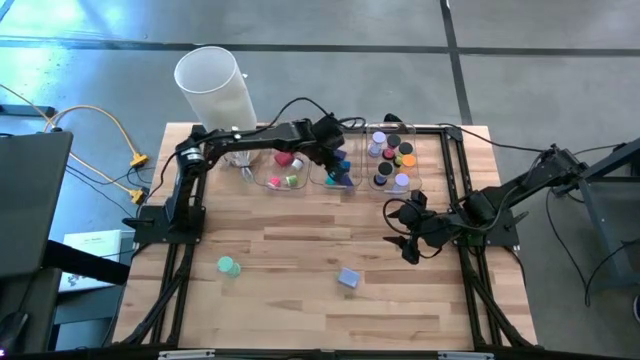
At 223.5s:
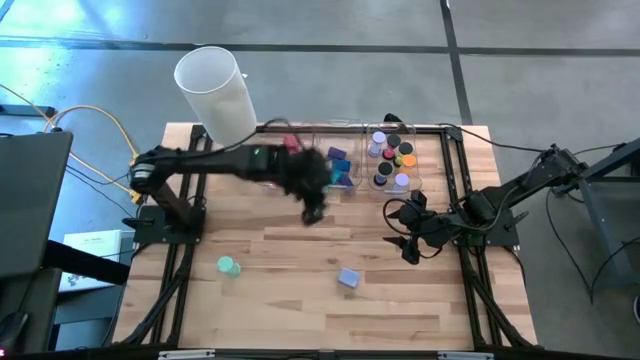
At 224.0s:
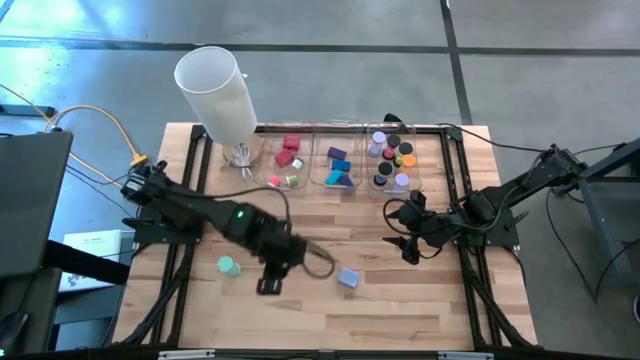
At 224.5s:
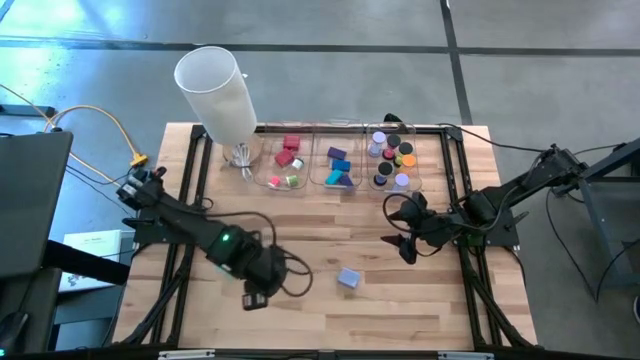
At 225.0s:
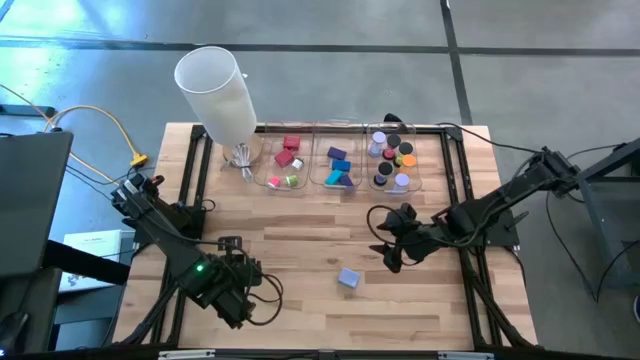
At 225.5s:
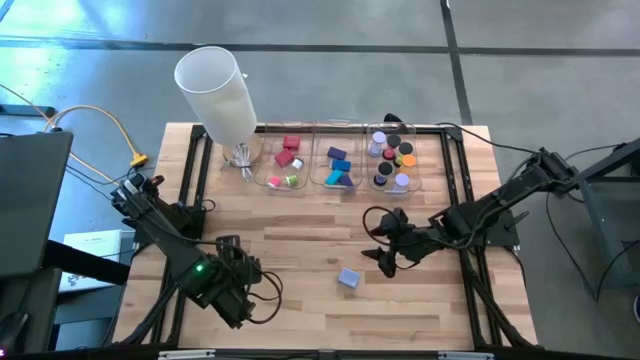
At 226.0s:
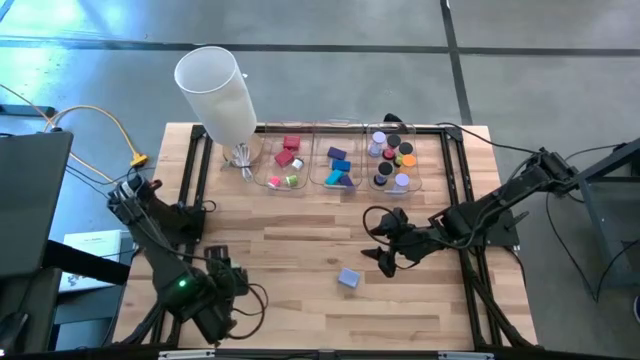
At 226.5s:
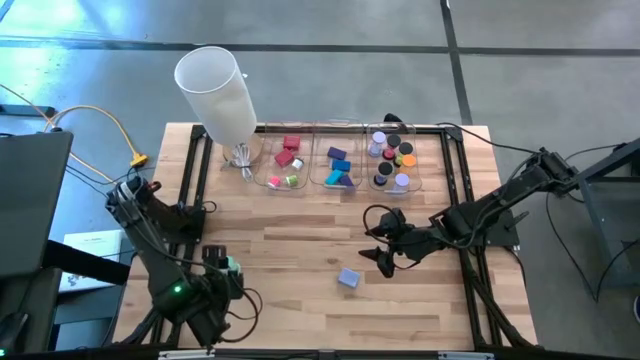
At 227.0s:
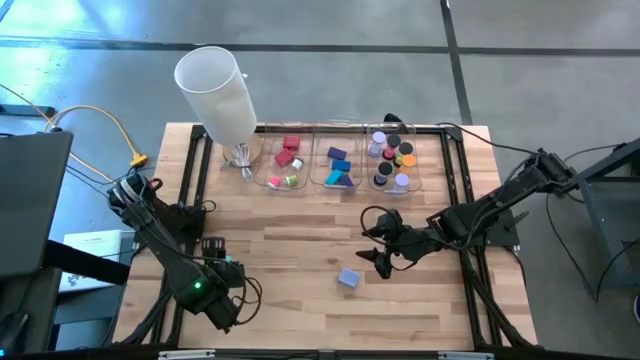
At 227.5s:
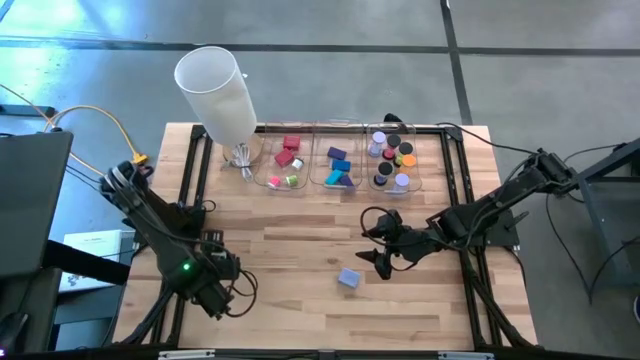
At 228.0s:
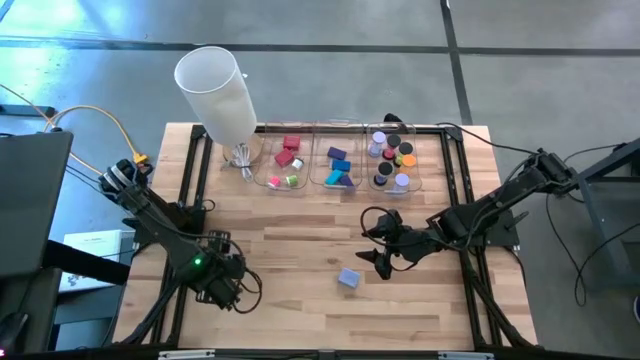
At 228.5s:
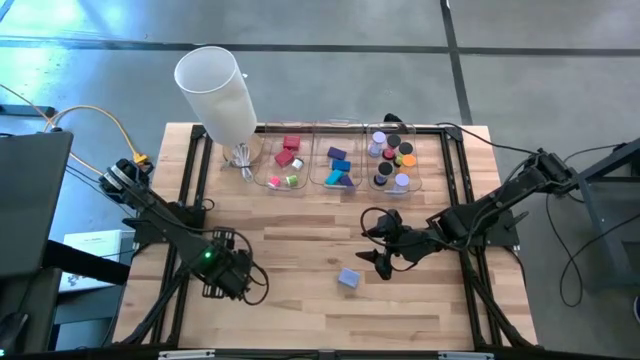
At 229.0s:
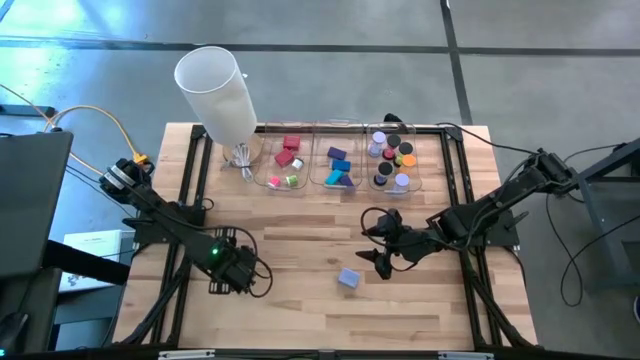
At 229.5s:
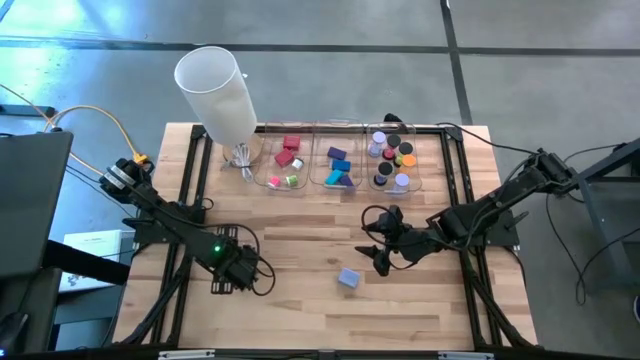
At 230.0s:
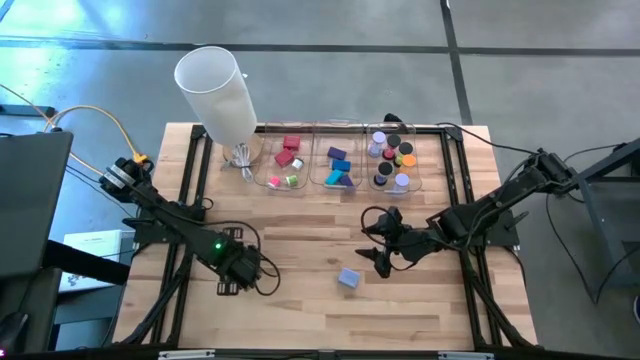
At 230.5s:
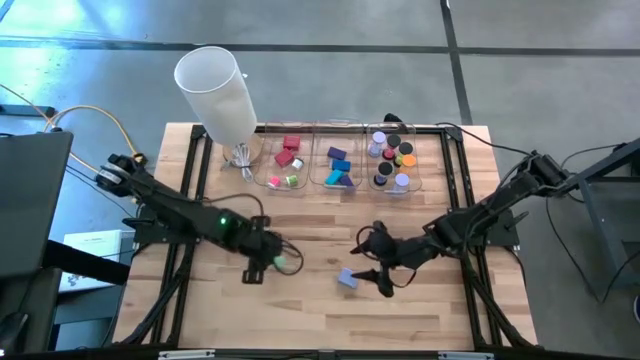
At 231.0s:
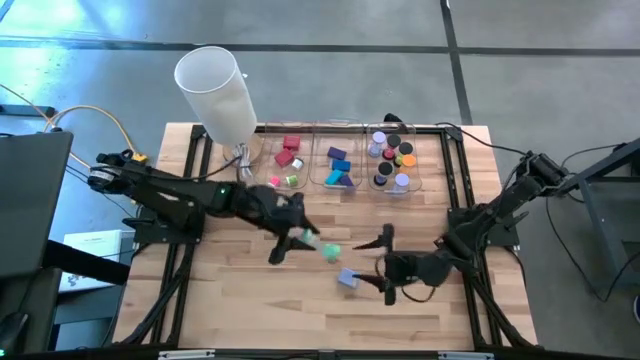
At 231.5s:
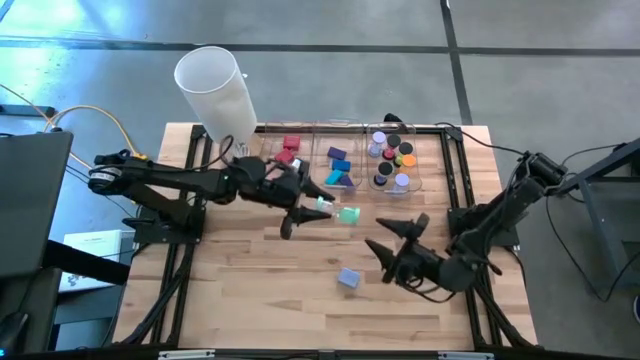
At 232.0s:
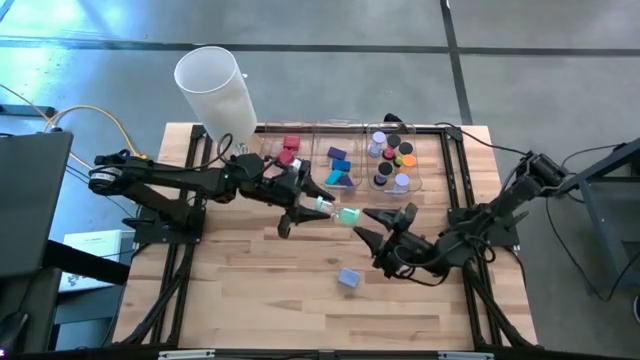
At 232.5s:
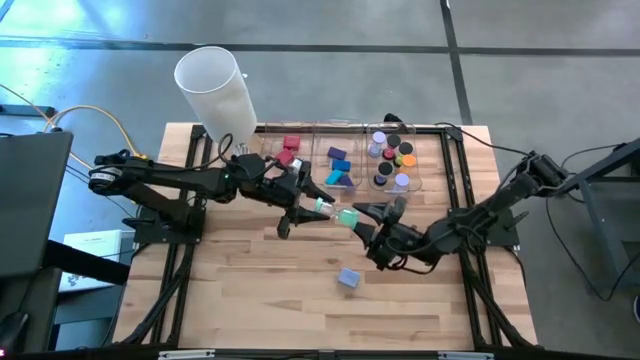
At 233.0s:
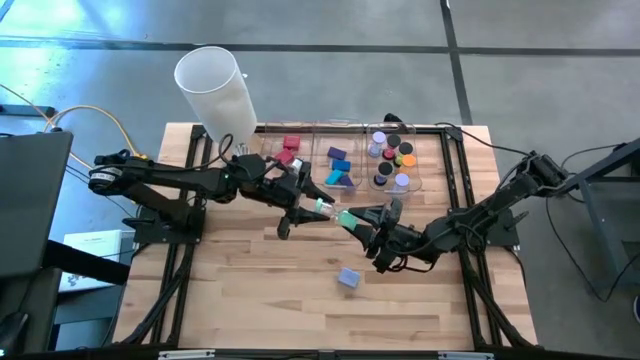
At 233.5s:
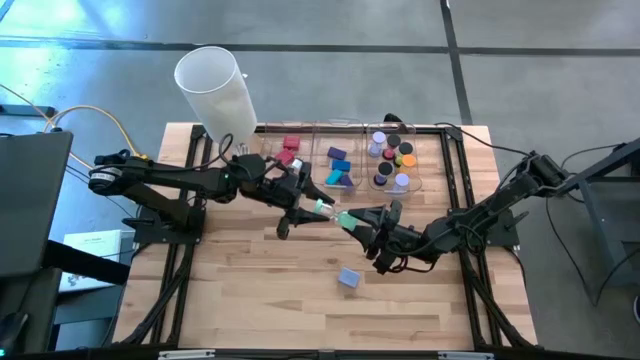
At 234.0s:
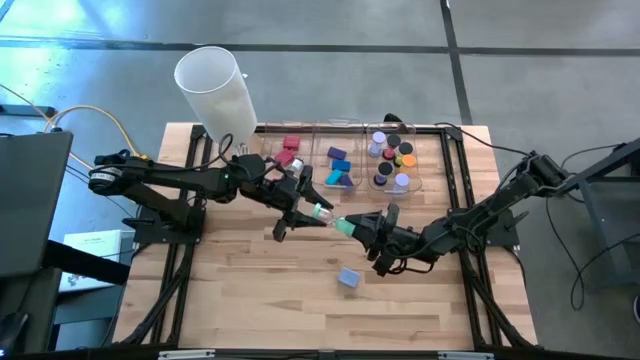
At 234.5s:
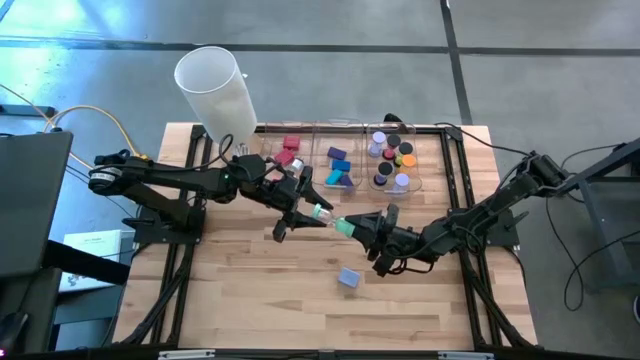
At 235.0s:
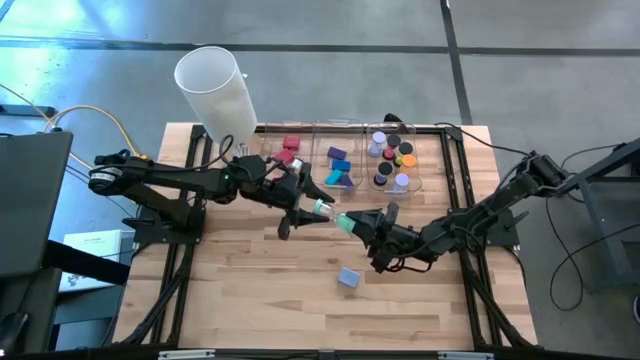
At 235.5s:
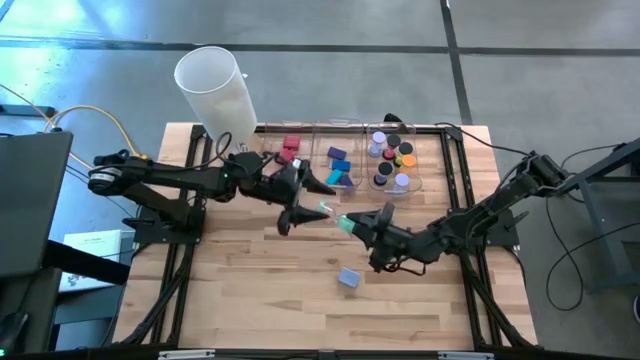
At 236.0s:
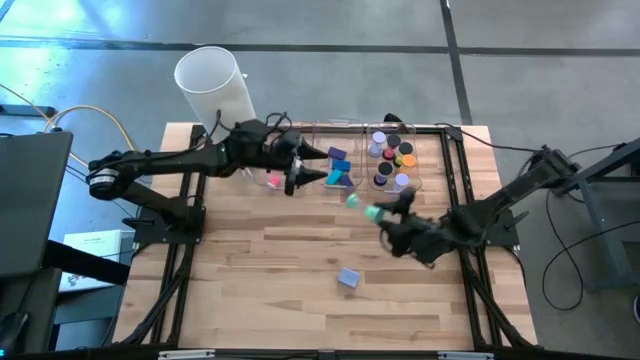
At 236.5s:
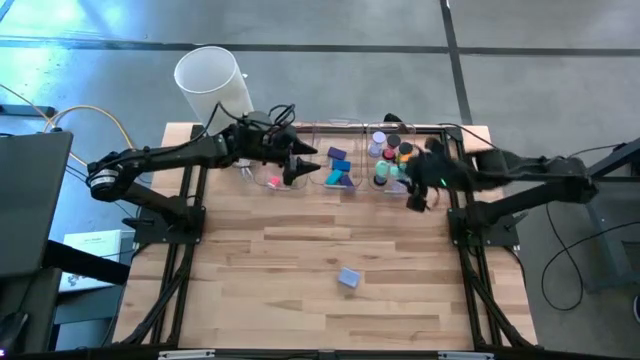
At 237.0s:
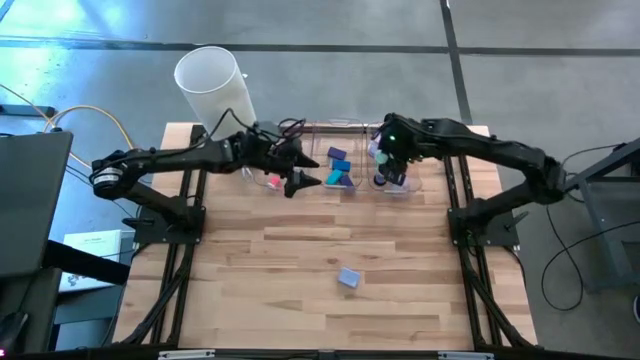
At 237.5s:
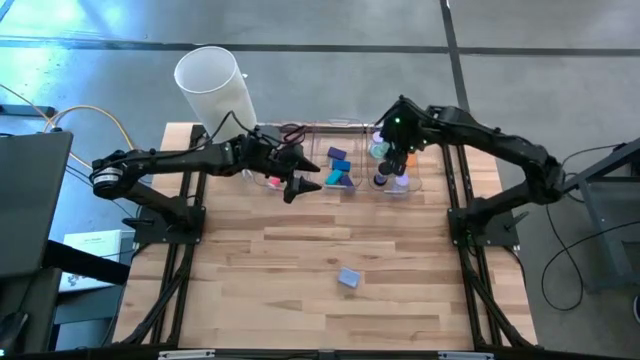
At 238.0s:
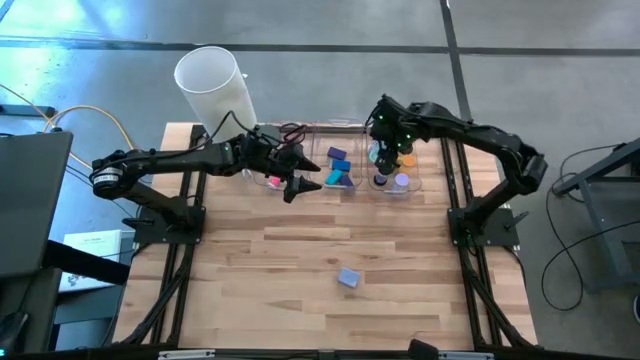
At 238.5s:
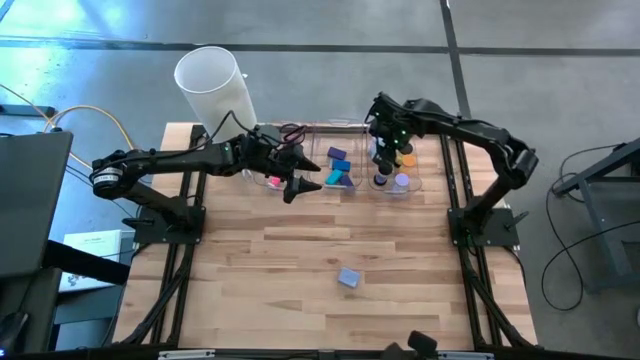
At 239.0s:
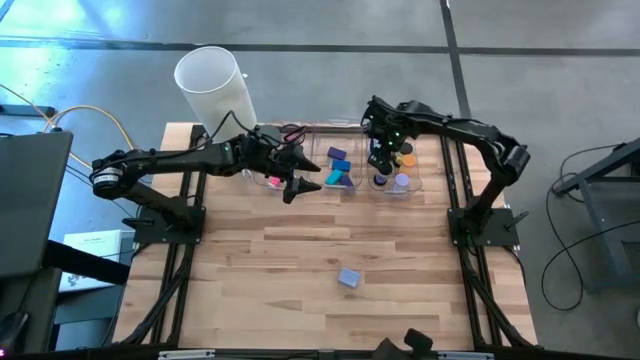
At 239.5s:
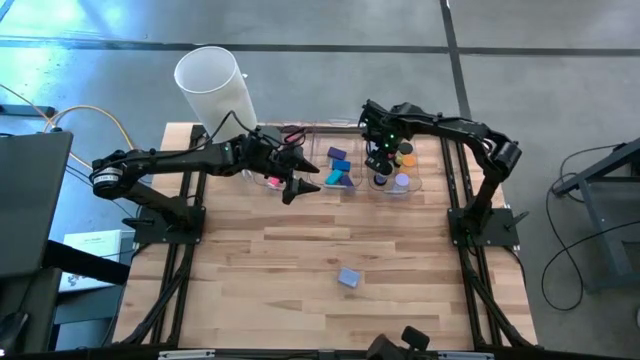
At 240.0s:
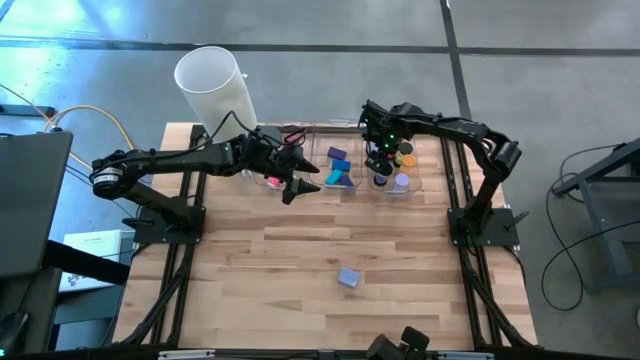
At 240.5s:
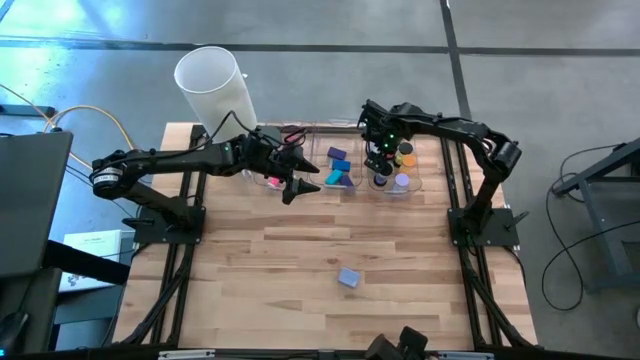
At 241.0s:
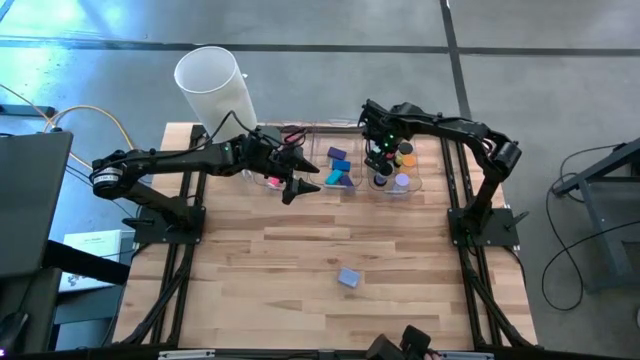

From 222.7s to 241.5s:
Task: Pick & Place Office items
Put the light blue hourglass into the right transparent bin

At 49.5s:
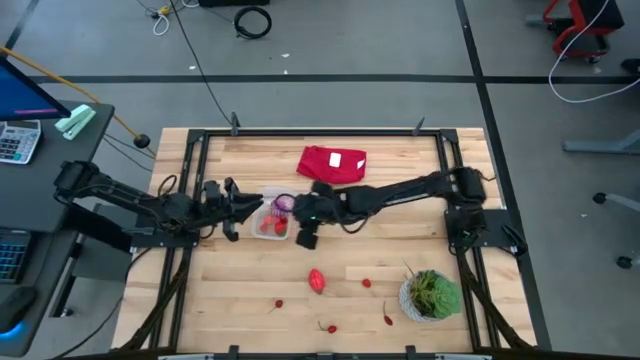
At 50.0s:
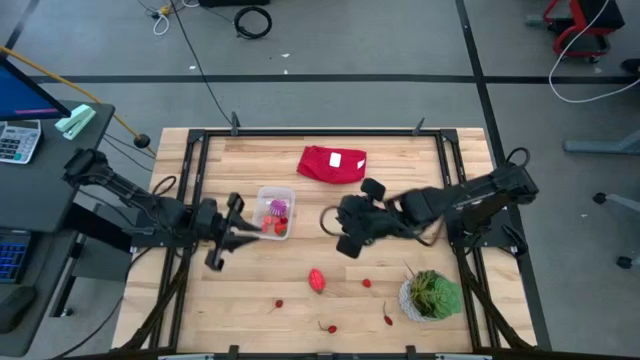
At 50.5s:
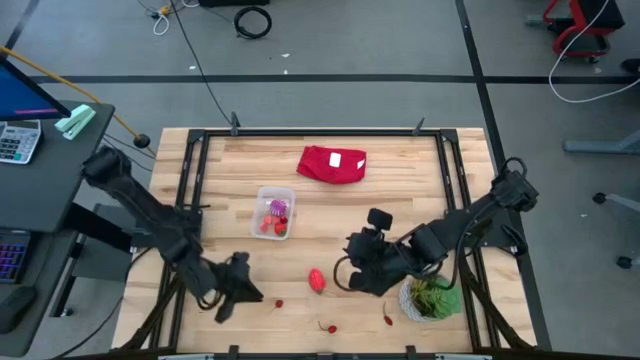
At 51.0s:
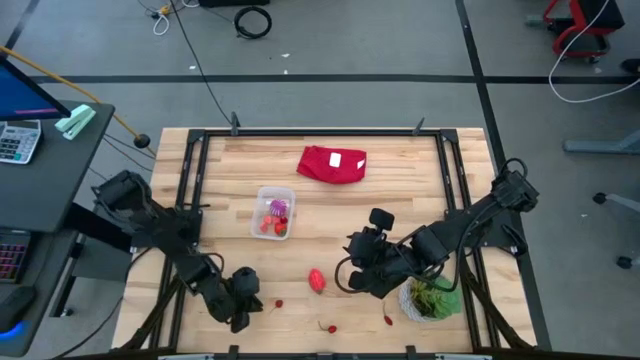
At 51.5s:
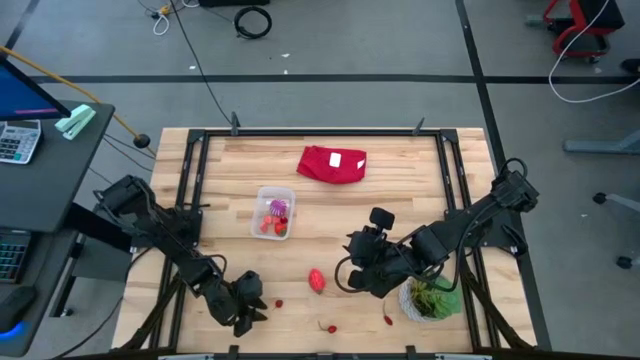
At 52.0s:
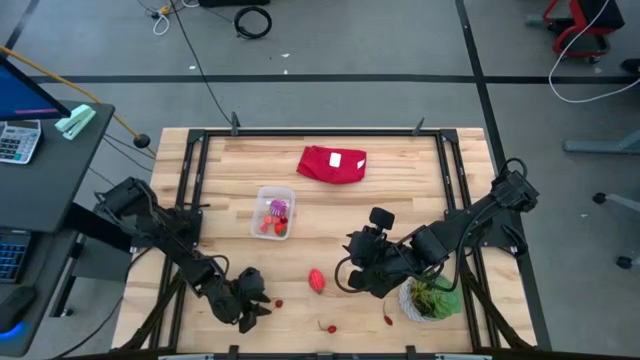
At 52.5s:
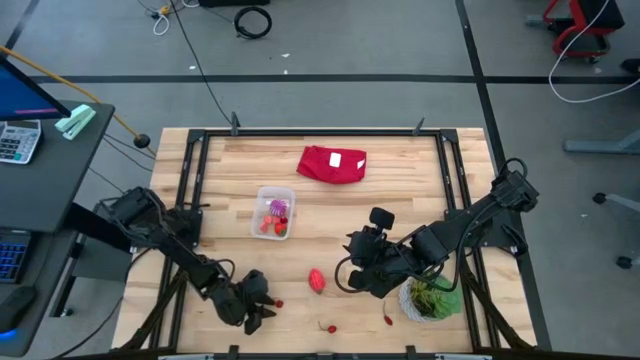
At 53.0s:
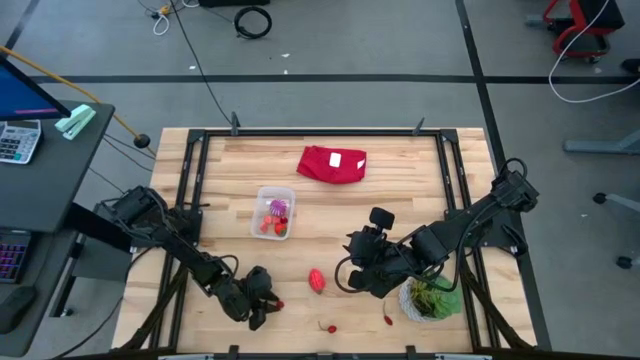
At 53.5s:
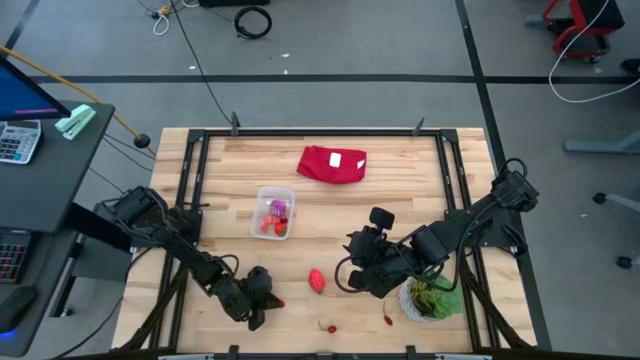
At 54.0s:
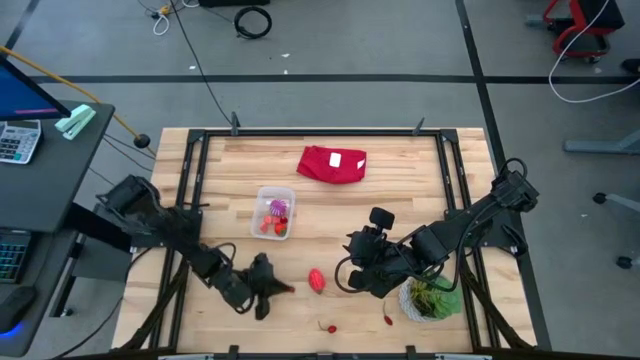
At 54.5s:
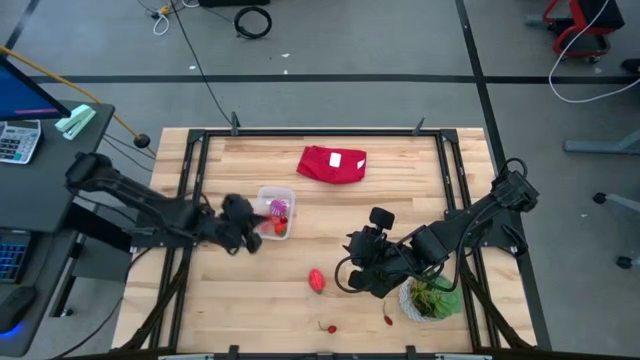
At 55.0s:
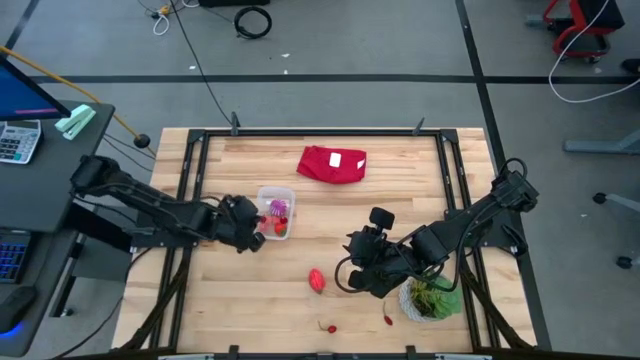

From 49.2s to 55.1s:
Task: Pick and placing Produce into tupperware
Put the red cherry in the transparent bin
